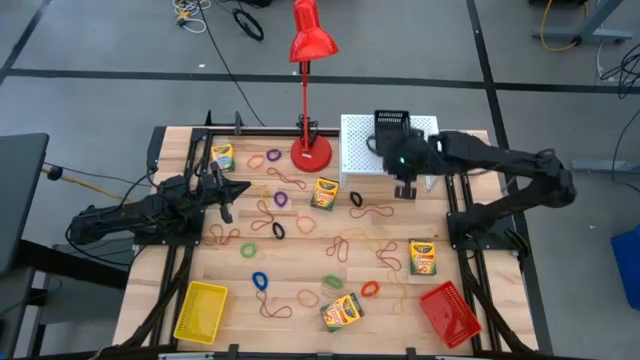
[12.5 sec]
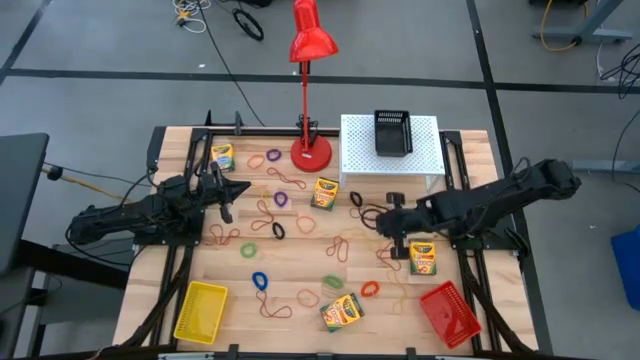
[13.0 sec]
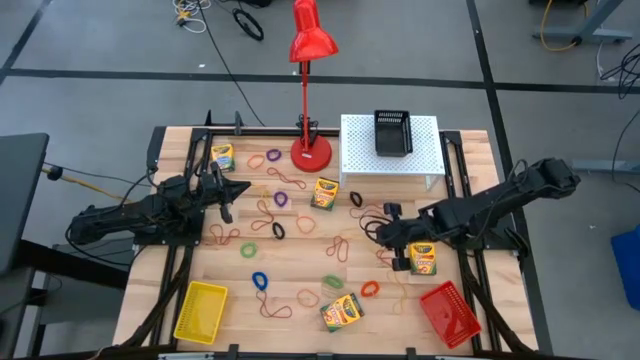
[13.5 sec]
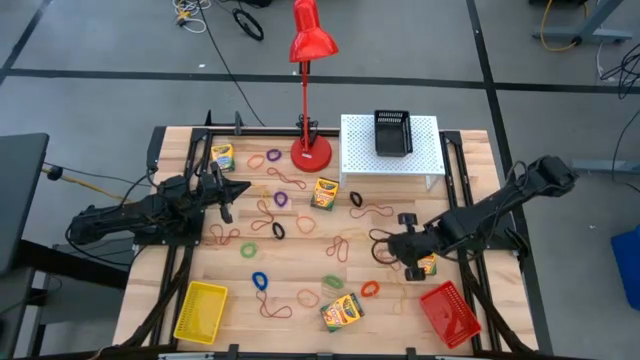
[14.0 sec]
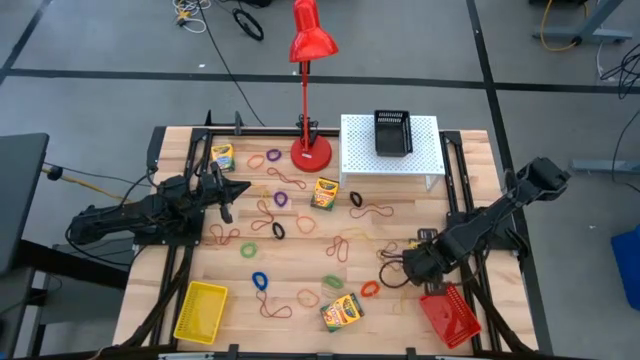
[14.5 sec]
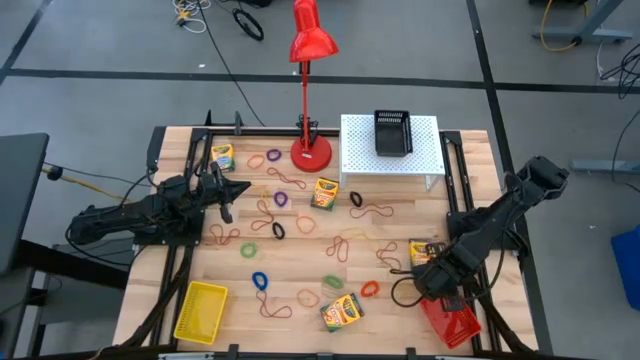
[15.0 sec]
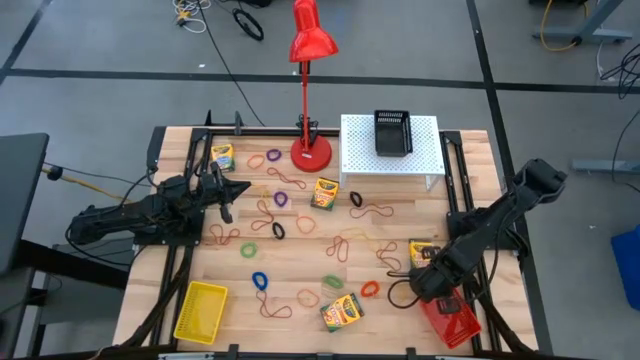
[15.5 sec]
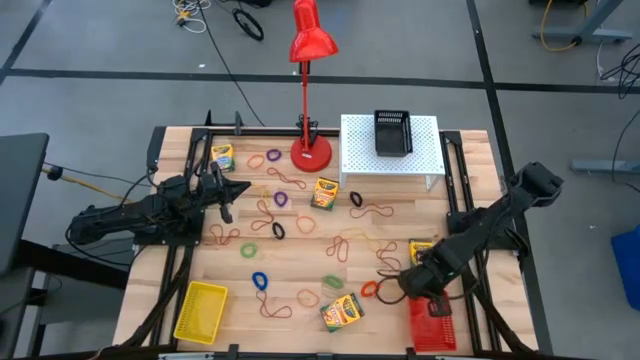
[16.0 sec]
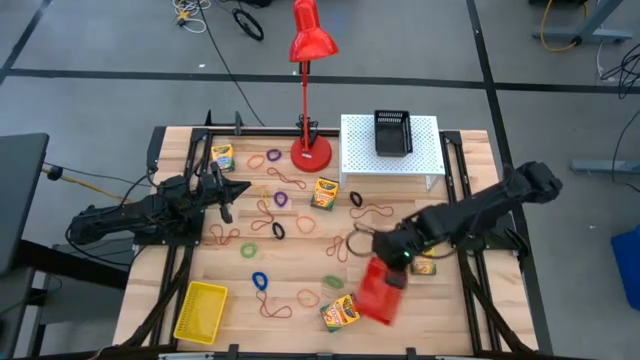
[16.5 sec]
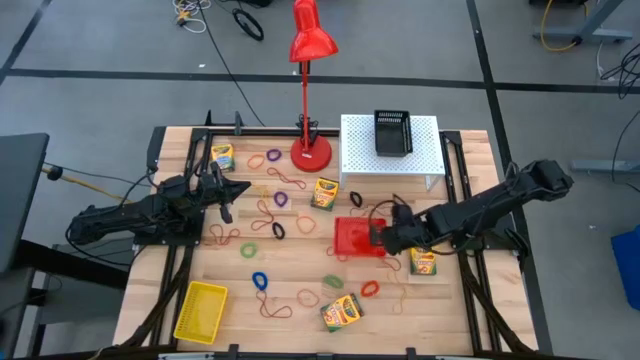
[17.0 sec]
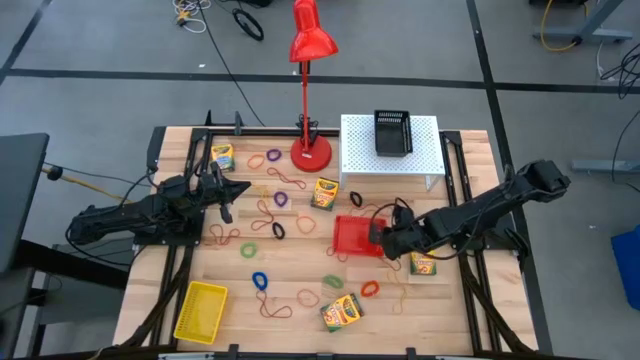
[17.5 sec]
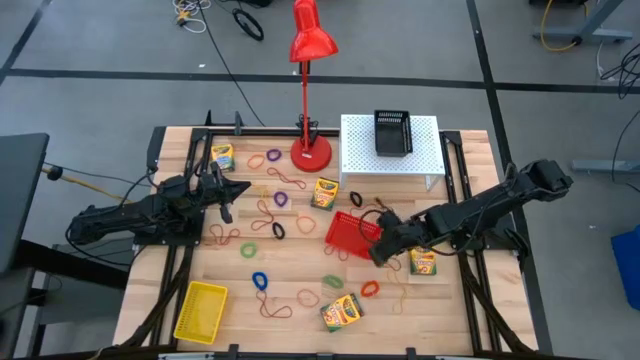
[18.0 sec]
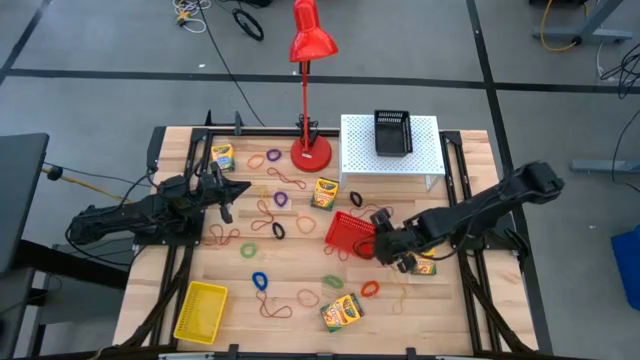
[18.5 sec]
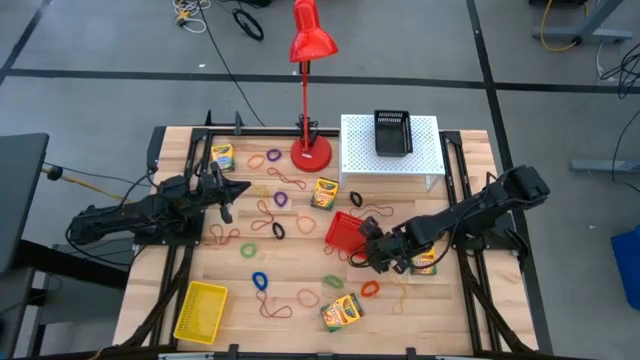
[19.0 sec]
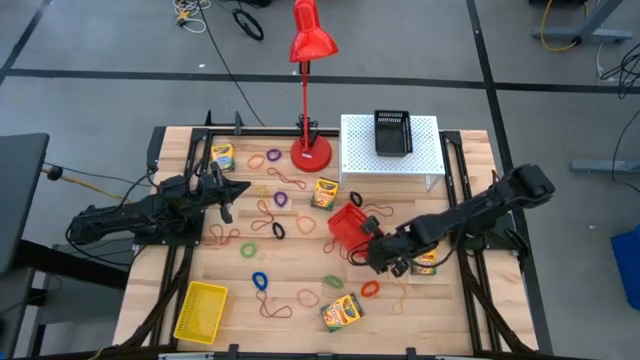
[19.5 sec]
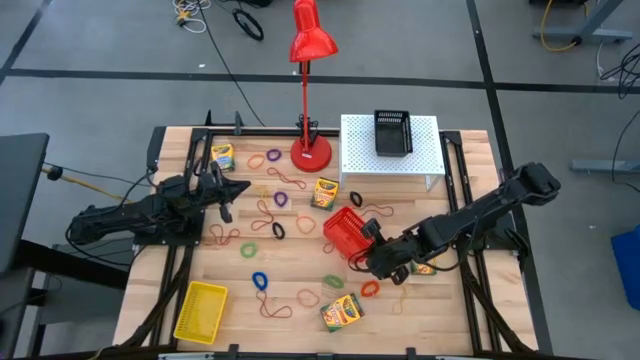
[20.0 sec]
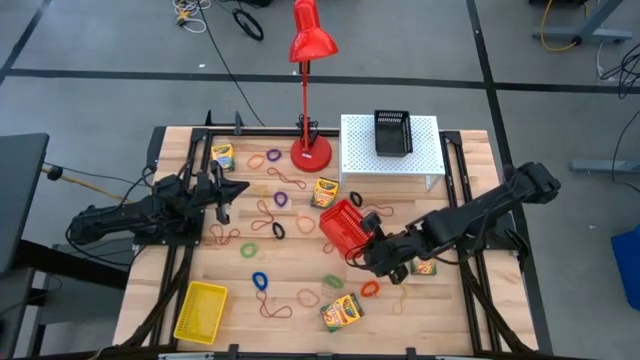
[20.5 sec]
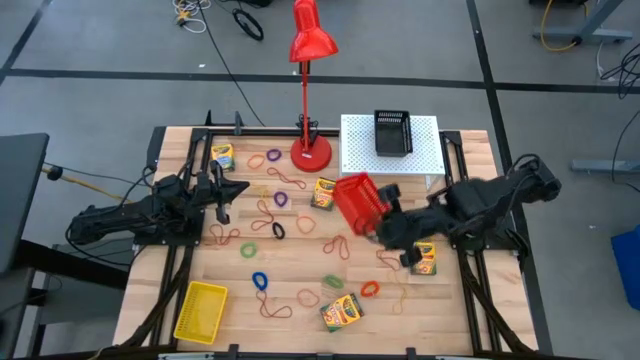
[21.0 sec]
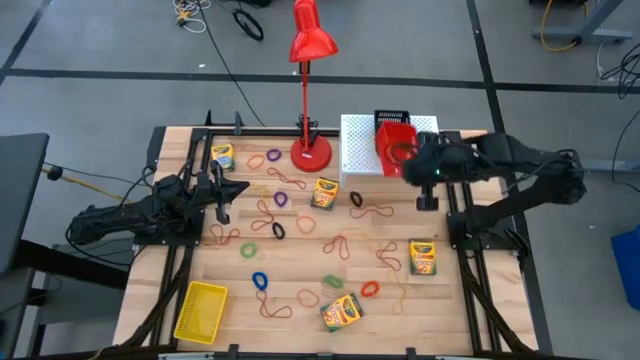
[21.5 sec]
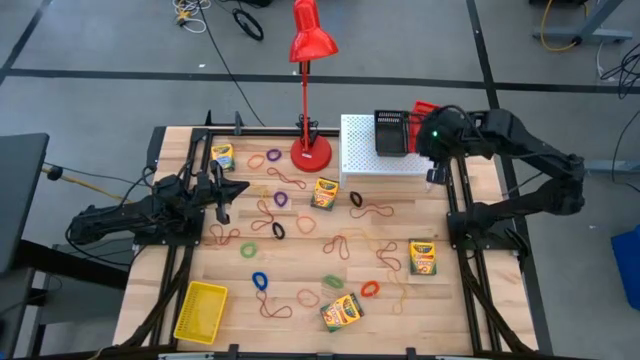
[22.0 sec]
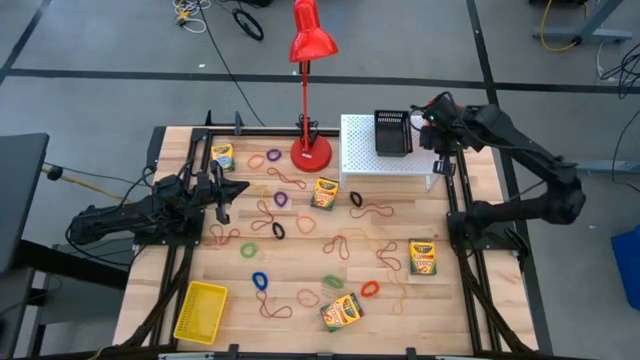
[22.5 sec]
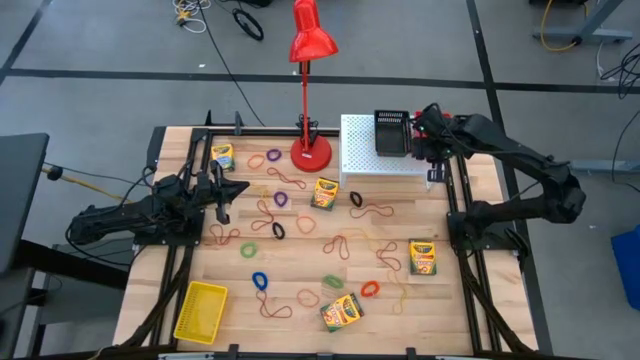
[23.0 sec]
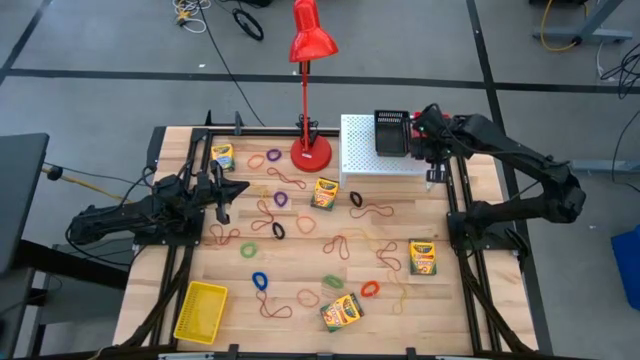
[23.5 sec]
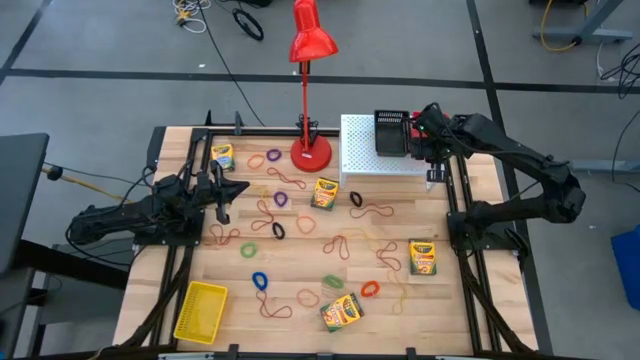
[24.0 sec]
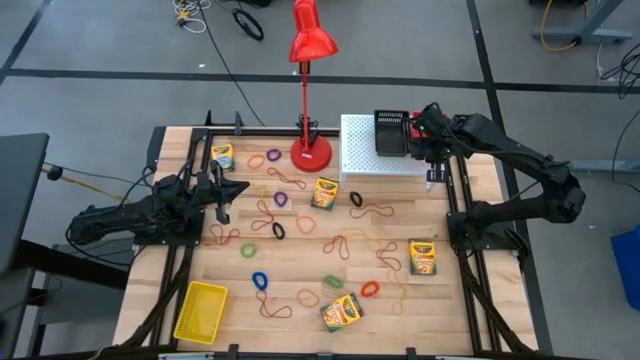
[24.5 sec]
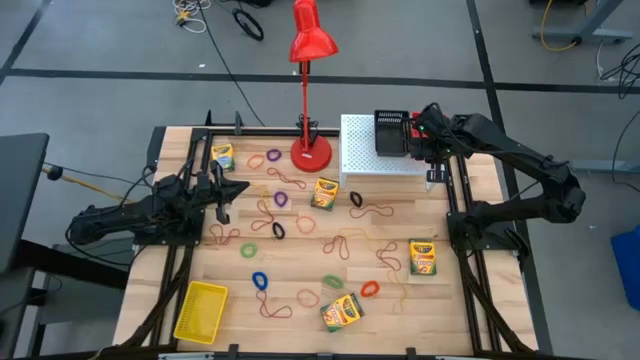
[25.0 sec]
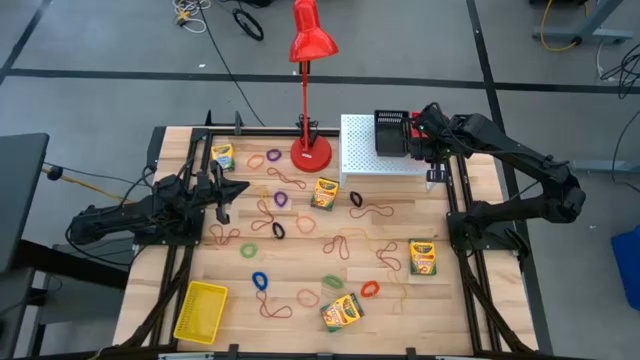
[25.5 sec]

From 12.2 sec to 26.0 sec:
Task: Pick & Place Office Desk Supplies
Put the red bin on the shelf

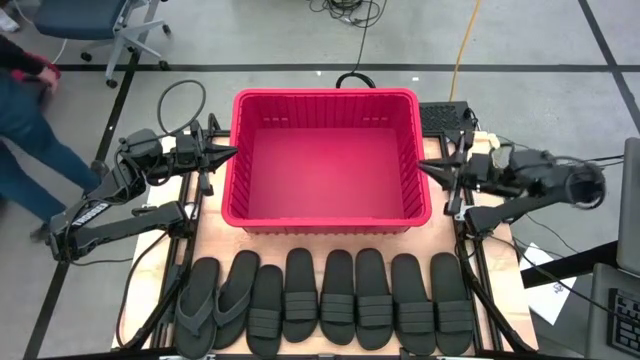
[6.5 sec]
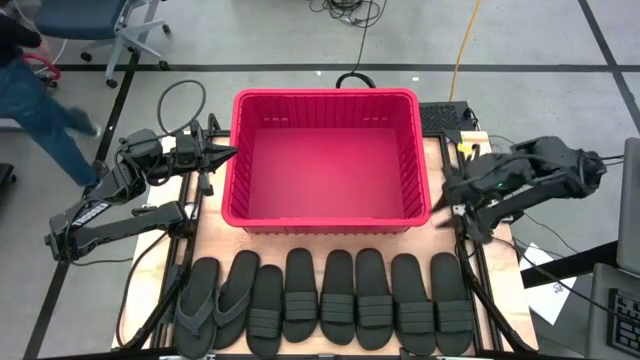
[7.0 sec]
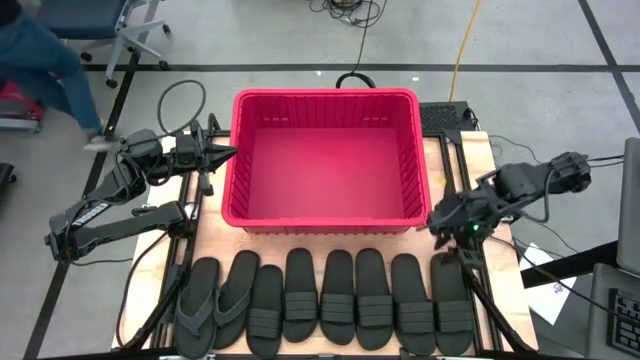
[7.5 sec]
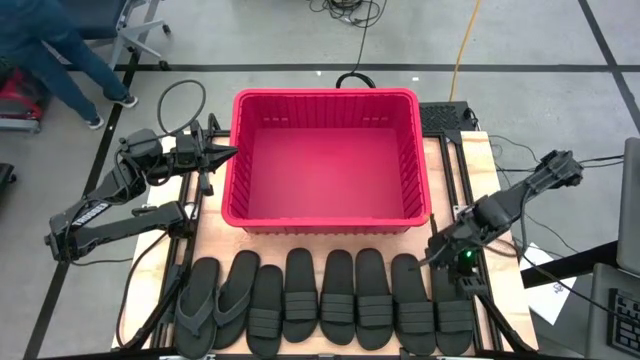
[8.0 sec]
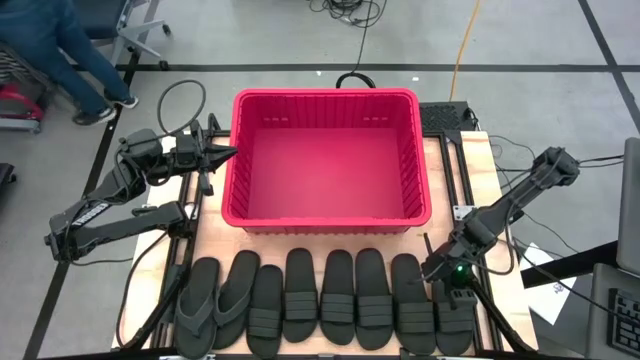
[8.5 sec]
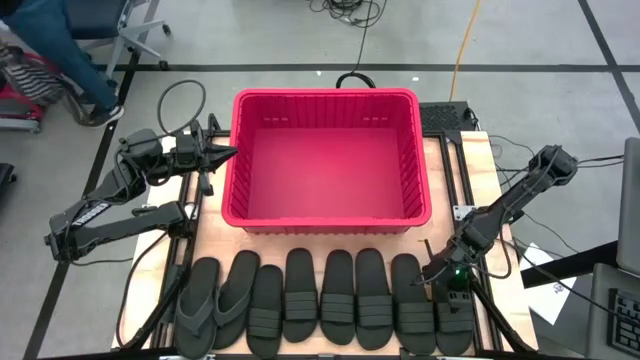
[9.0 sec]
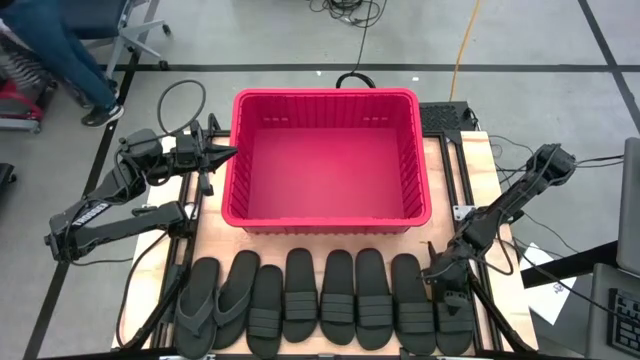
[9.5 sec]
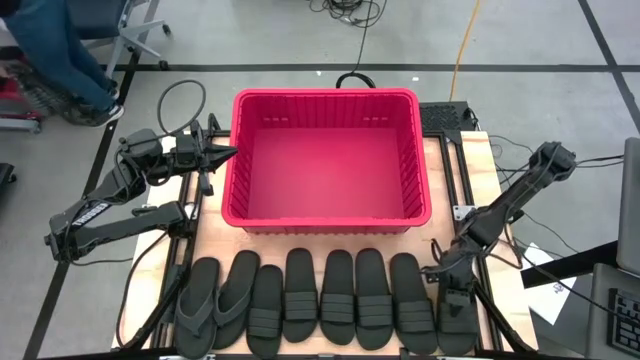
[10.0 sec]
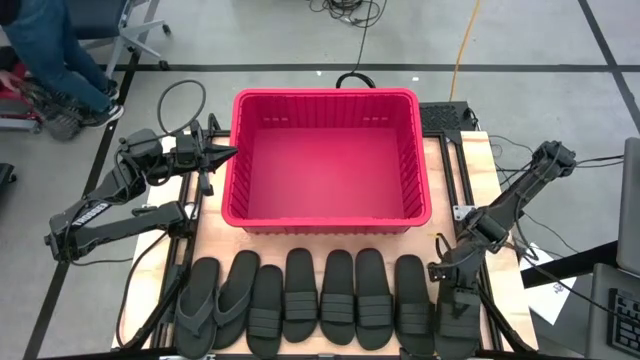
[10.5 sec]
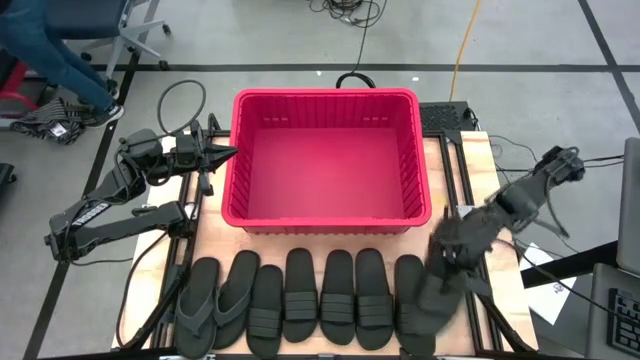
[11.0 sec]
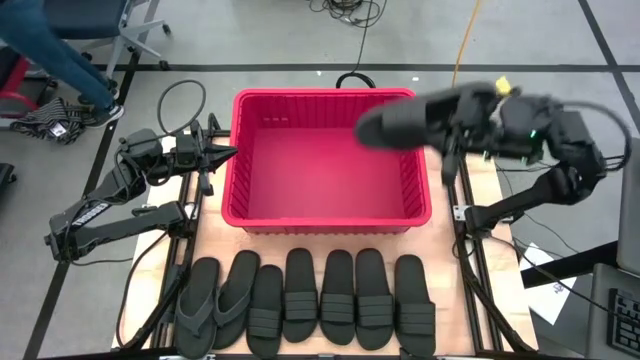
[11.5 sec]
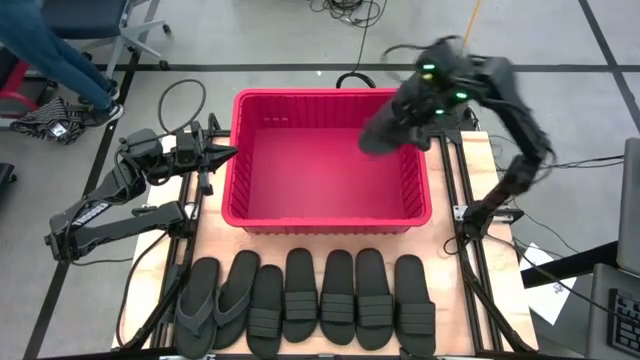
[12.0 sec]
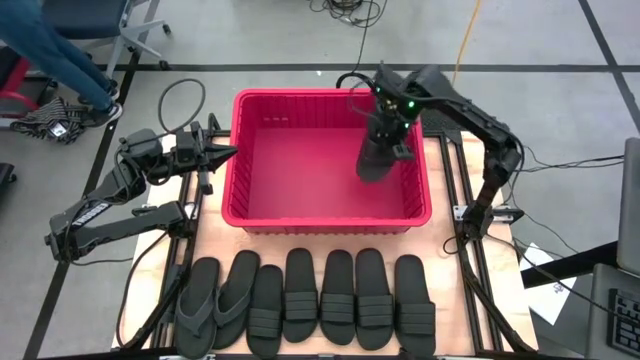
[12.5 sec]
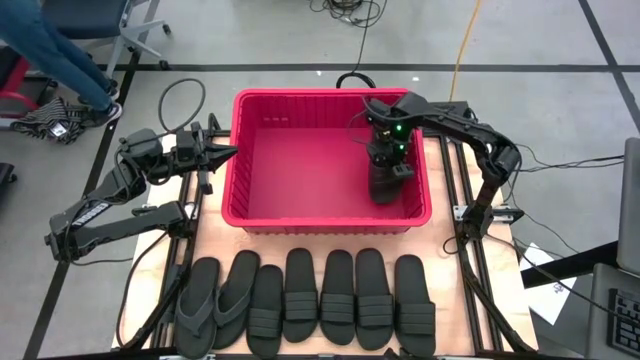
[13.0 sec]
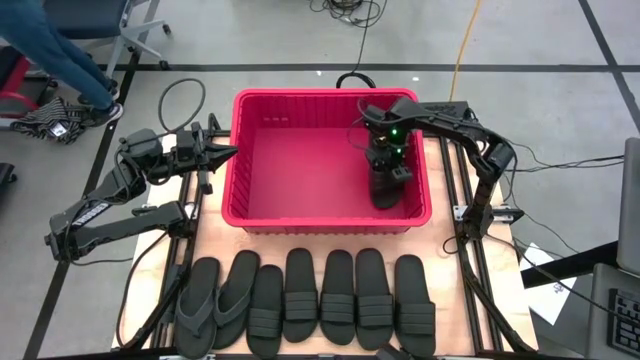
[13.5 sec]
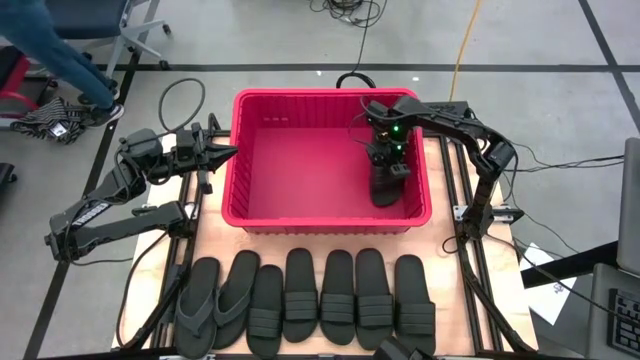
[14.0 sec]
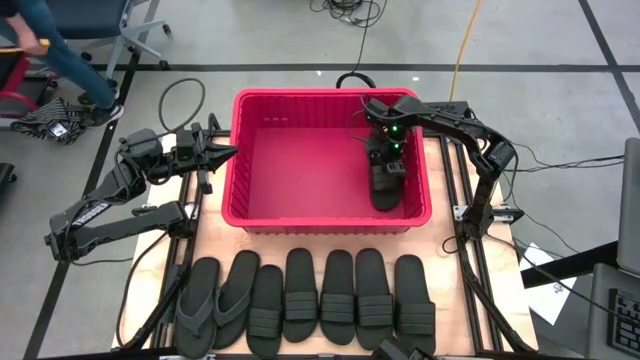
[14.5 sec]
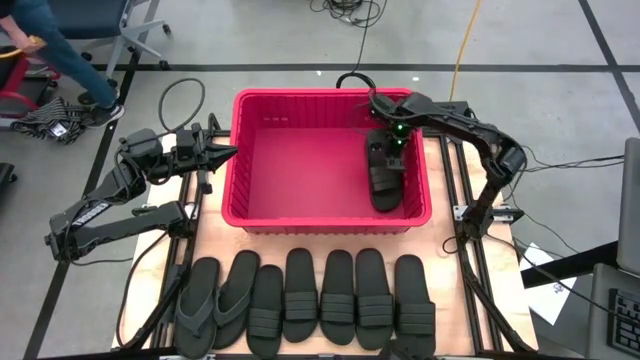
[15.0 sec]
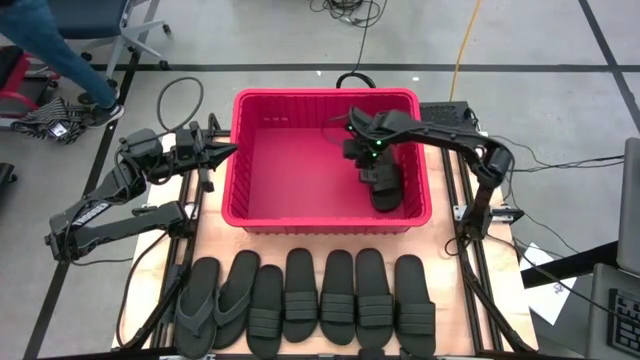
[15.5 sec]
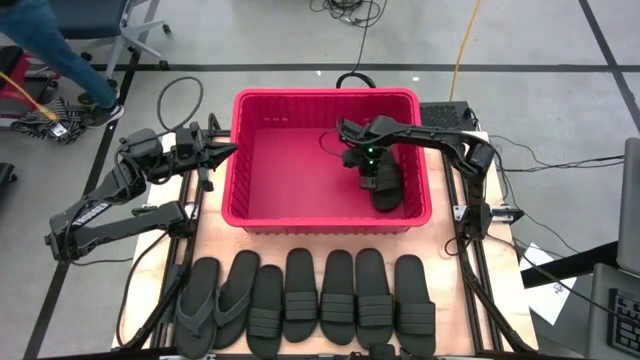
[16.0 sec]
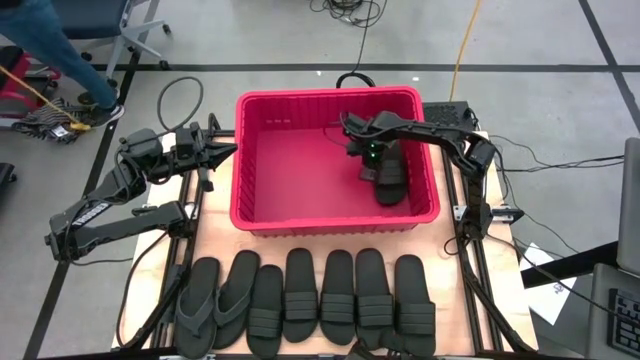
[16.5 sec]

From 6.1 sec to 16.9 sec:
Task: Pick and place slides into bin
Put the black slide into the red bin
